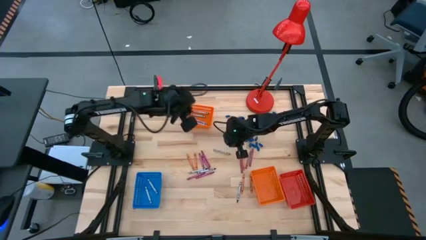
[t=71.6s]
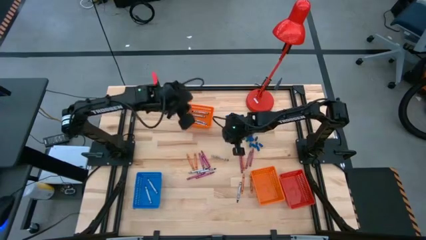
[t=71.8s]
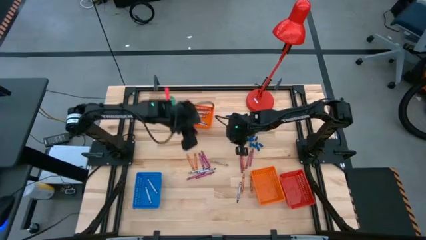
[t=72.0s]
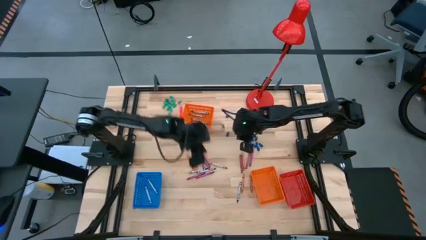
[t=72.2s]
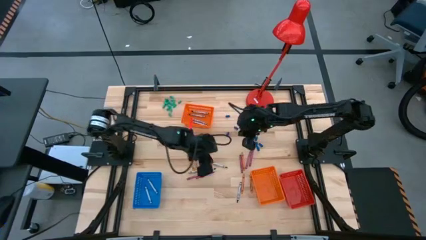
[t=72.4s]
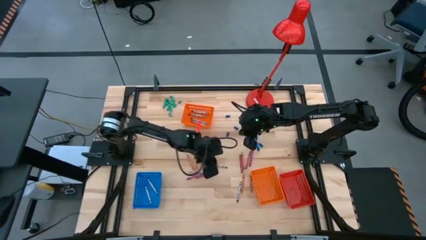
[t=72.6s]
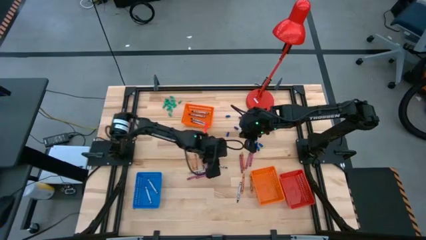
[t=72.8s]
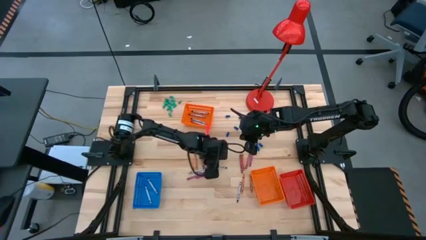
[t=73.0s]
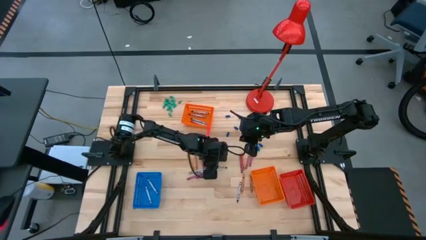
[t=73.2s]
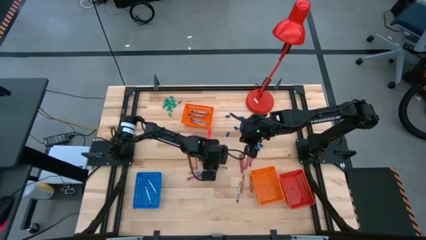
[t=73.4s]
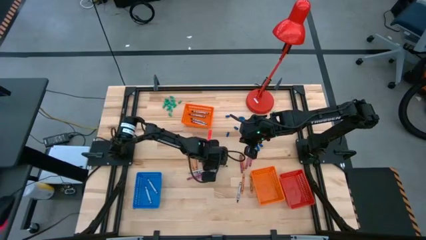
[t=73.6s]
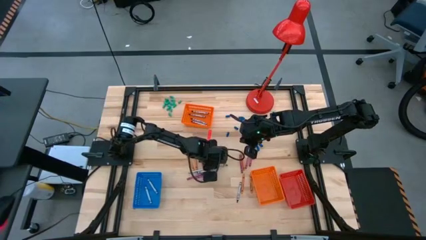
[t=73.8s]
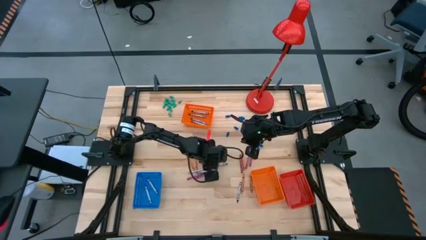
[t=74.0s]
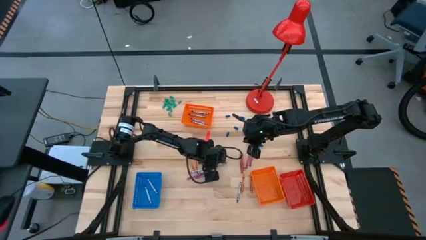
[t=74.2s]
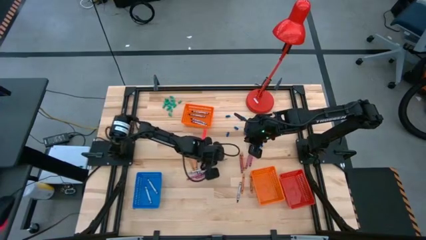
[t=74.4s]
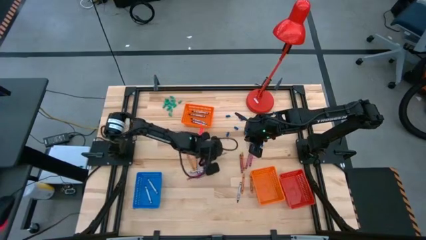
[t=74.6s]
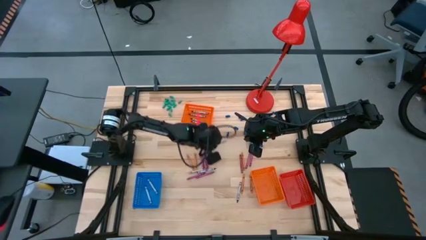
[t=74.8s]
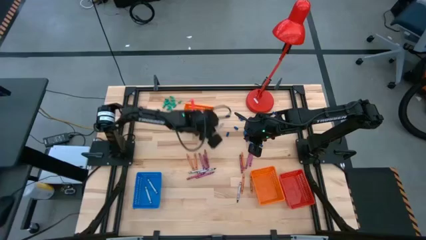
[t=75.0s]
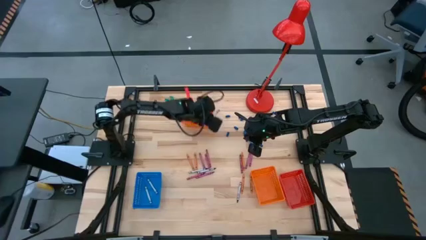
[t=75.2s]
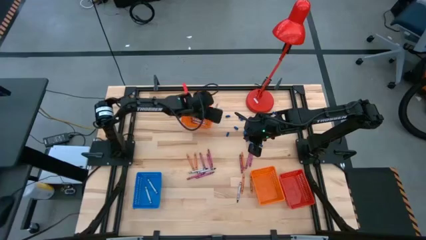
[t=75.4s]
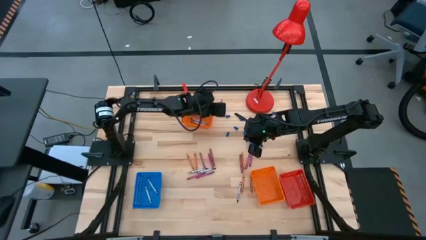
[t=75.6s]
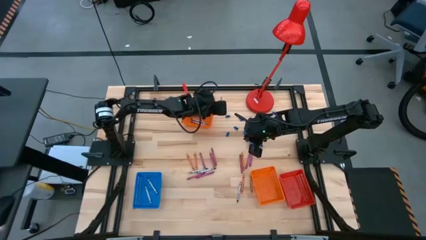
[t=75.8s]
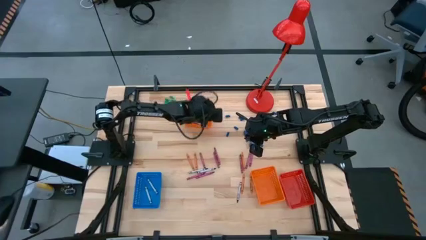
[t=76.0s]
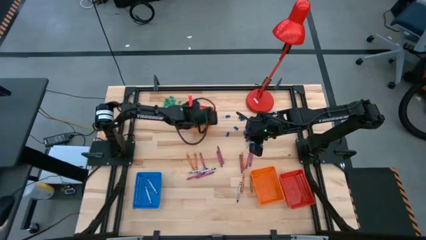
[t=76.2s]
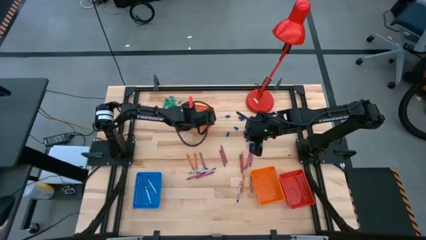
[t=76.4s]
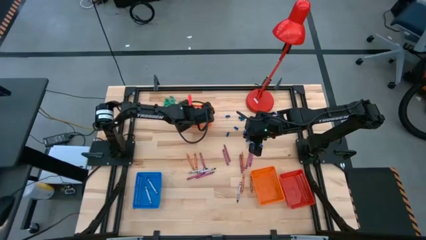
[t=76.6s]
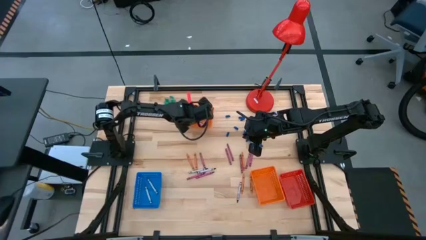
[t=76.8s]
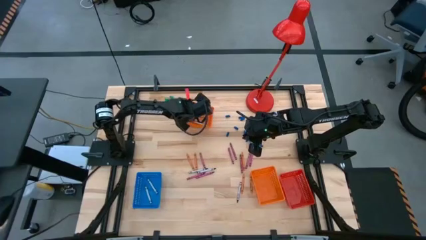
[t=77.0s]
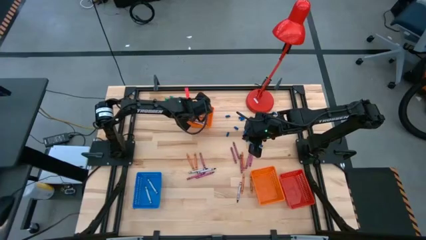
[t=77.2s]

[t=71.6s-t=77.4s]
Task: Sort crayons
Put the black crayon into the top orange bin

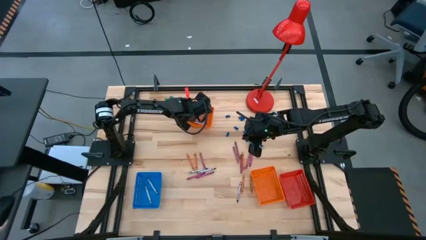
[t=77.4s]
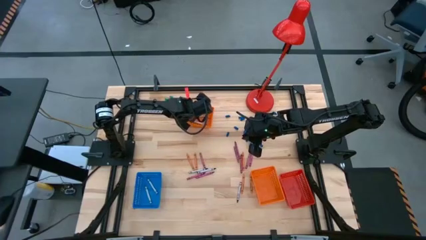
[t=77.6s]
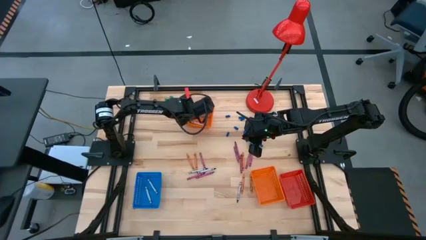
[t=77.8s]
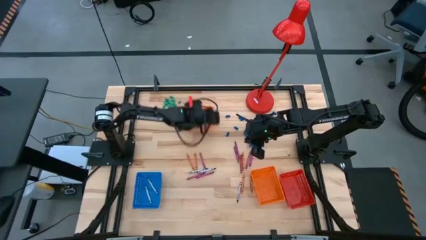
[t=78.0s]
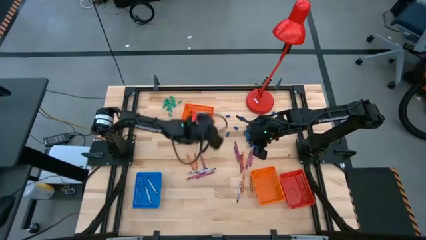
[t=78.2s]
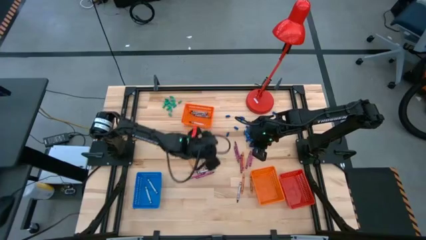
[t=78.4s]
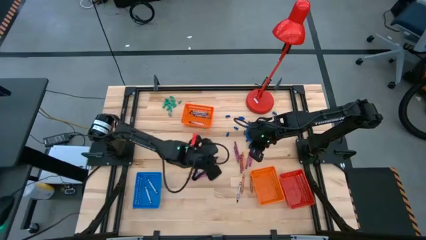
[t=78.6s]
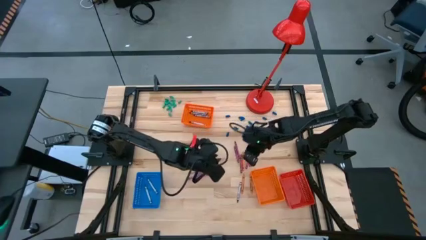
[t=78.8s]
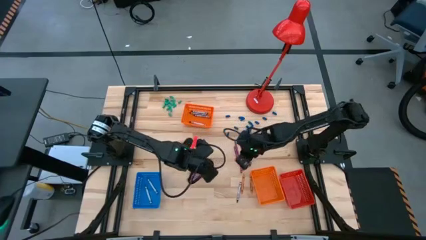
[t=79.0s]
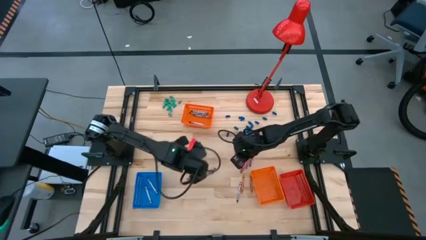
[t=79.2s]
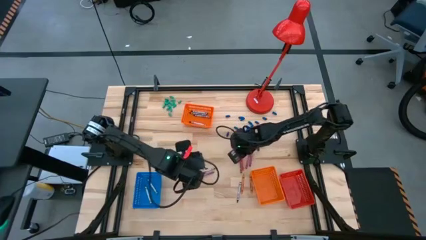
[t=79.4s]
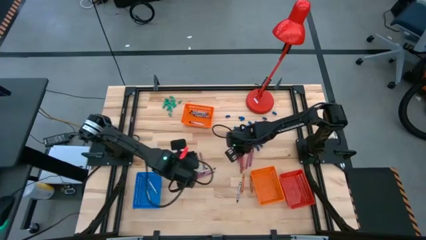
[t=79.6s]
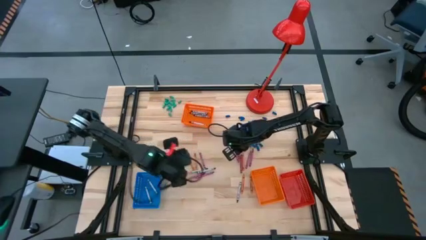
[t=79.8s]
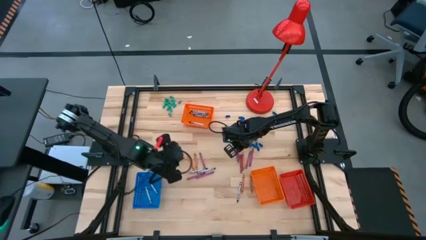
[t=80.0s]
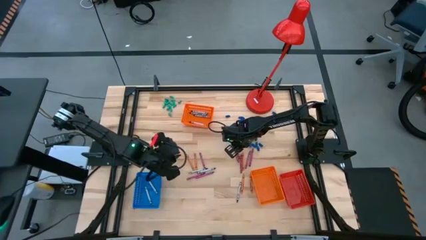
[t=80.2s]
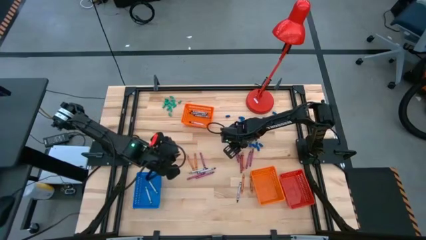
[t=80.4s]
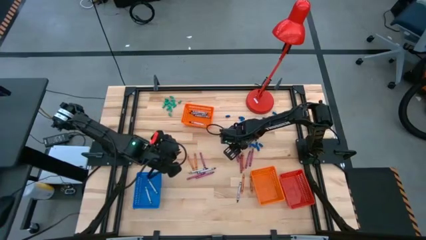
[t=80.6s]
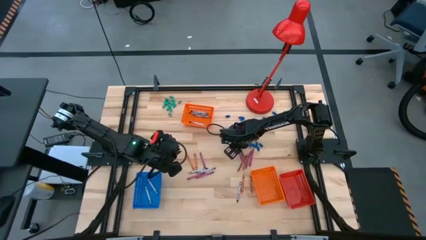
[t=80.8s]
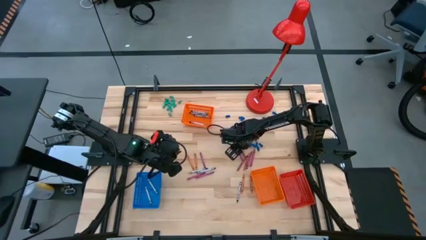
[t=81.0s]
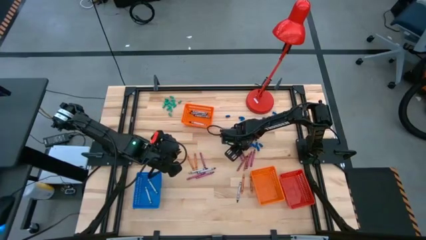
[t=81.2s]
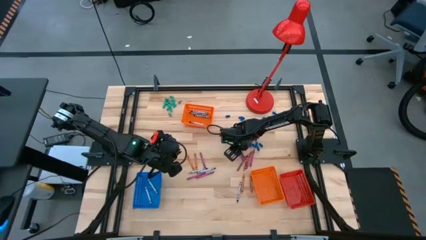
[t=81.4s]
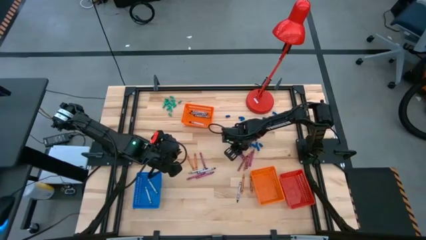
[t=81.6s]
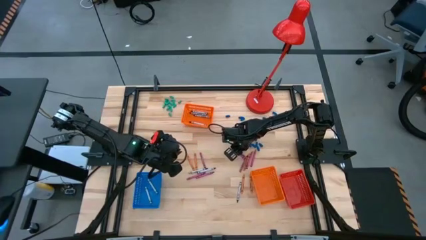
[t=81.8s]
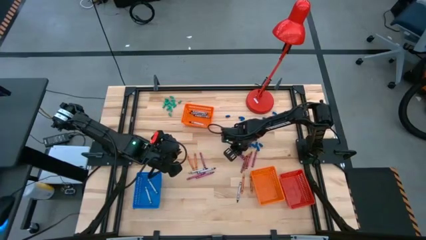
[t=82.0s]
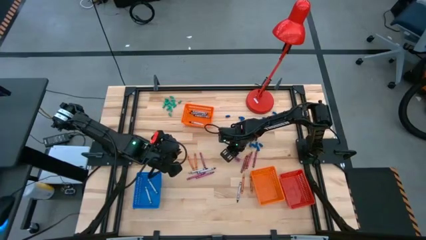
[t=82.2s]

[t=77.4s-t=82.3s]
Put the red crayon into the red bin

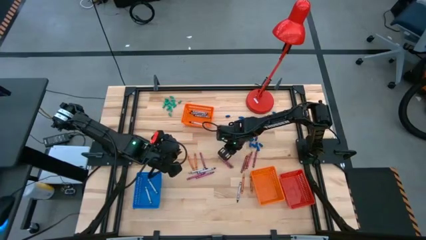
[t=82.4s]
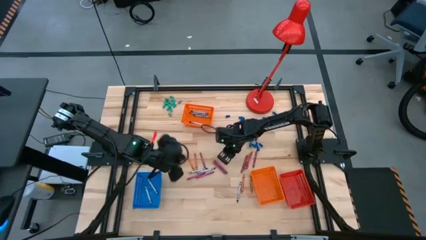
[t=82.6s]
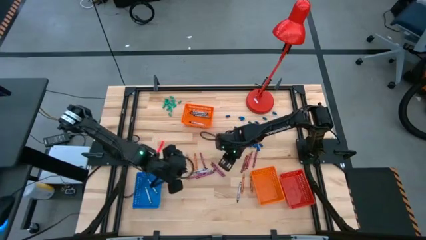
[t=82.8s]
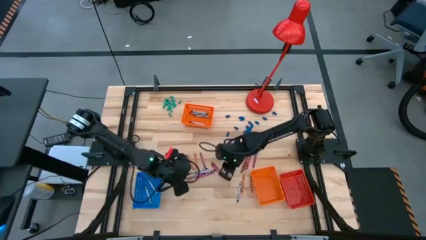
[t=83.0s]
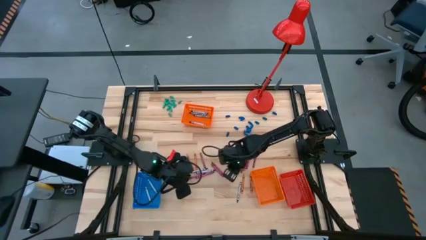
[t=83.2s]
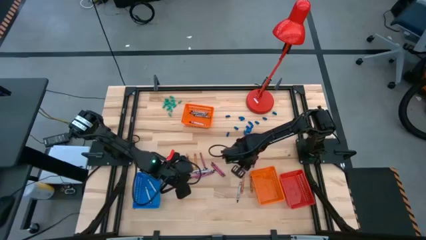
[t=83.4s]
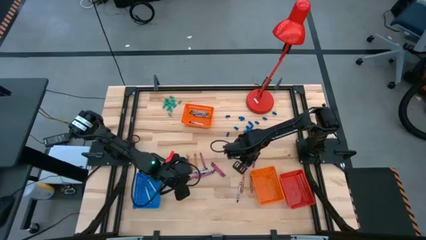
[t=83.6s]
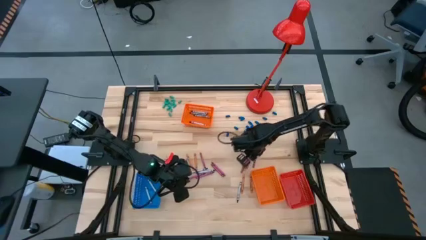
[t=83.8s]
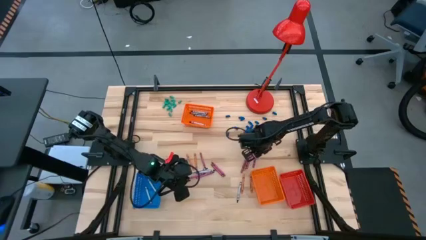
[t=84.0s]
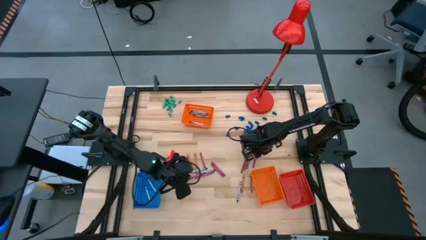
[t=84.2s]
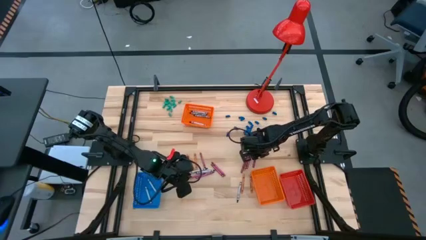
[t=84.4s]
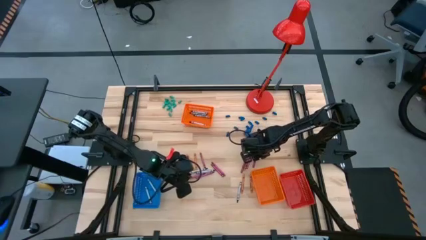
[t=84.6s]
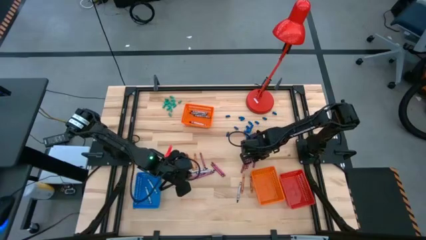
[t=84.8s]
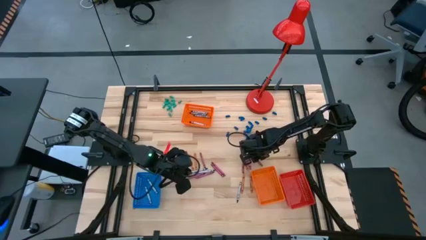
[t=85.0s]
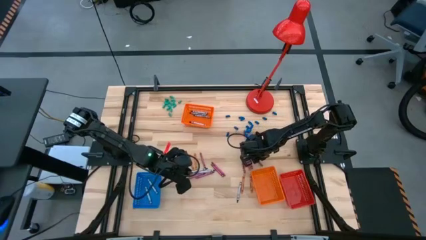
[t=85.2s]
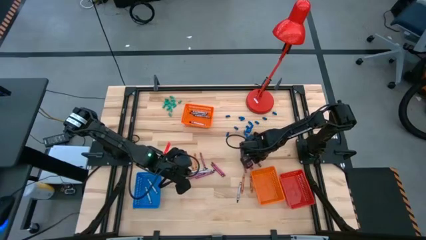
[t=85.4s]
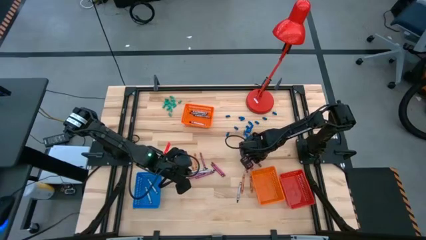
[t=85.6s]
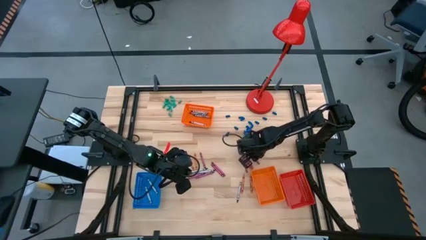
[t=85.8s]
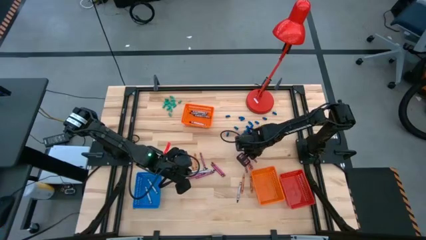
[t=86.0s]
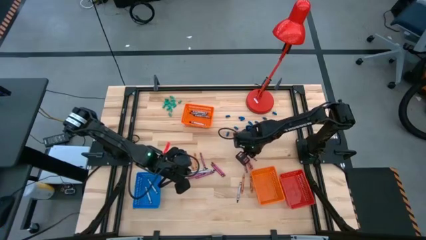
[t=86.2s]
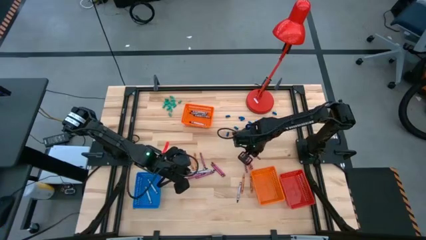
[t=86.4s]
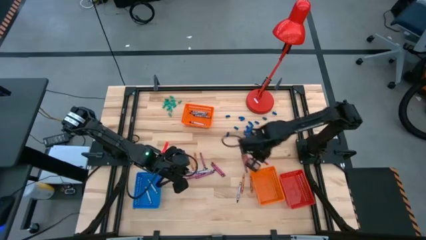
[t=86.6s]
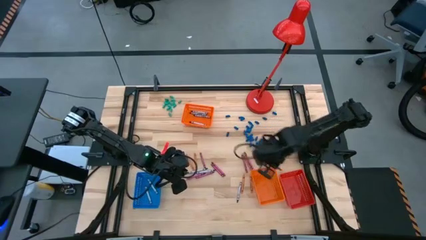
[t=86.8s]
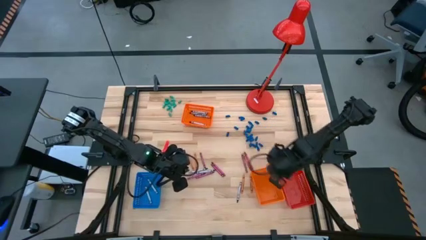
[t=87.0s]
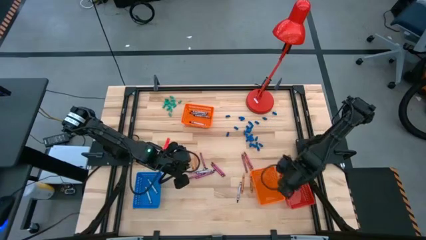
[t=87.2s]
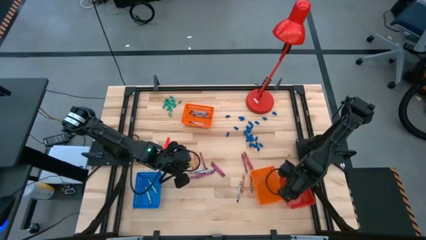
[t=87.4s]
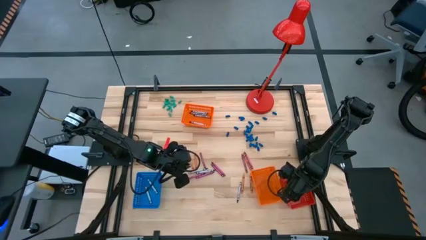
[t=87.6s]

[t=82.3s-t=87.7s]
Put the red crayon into the red bin
